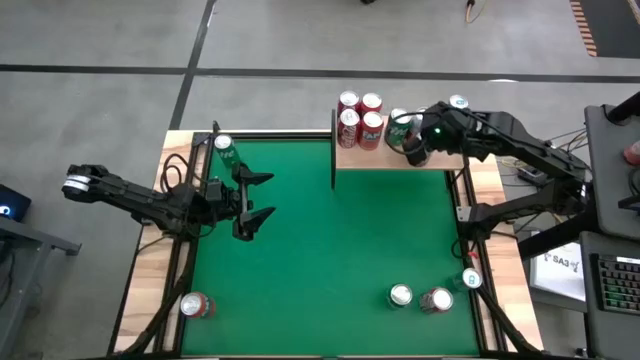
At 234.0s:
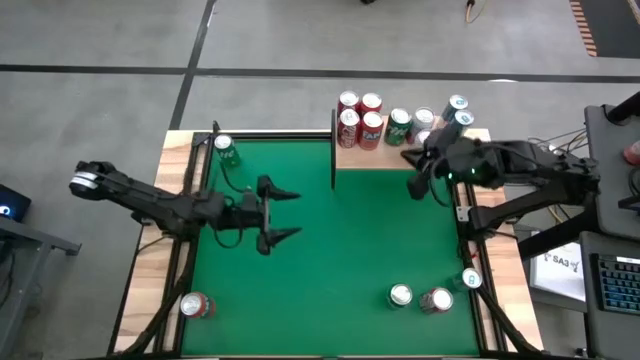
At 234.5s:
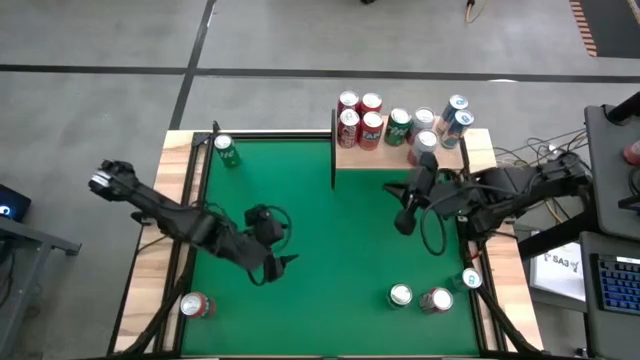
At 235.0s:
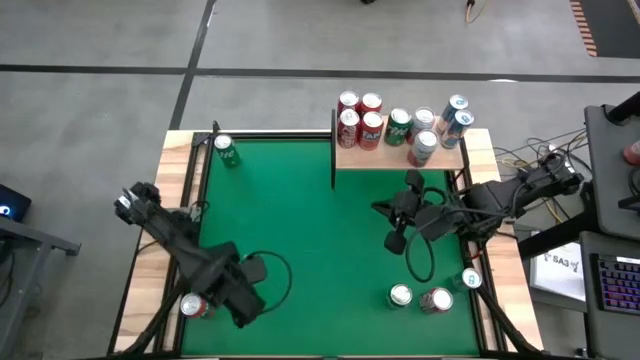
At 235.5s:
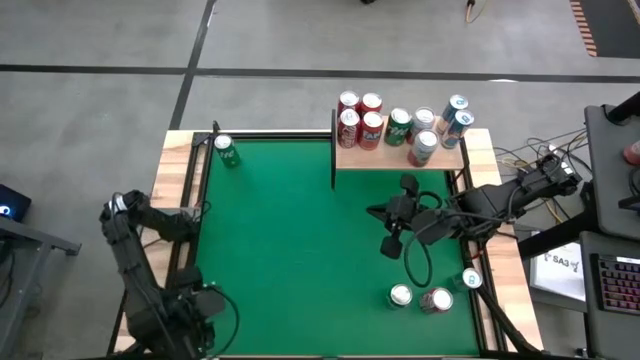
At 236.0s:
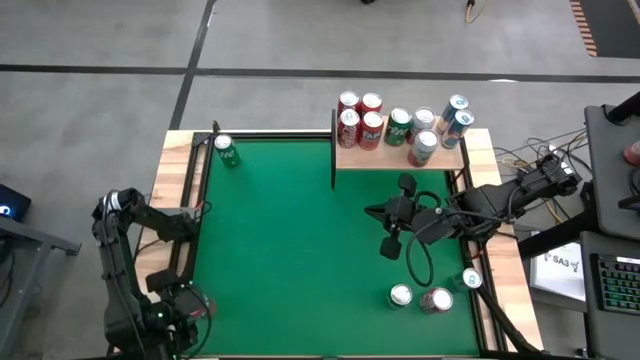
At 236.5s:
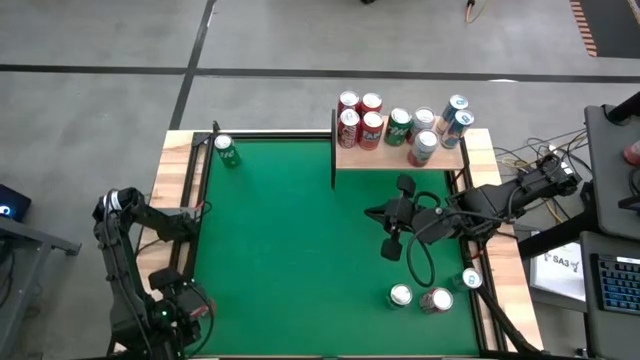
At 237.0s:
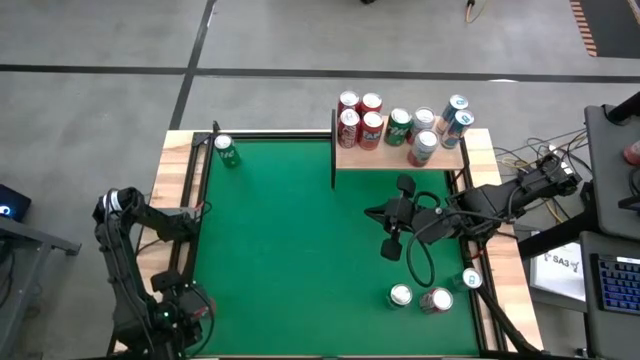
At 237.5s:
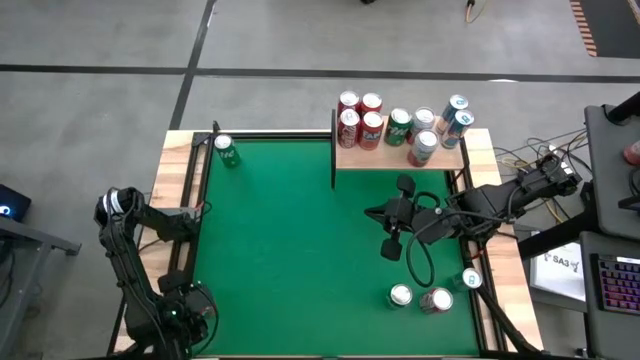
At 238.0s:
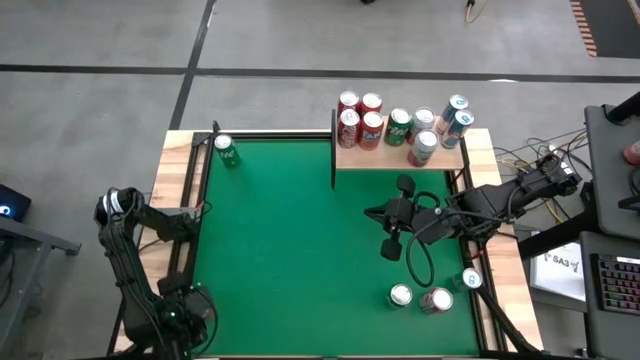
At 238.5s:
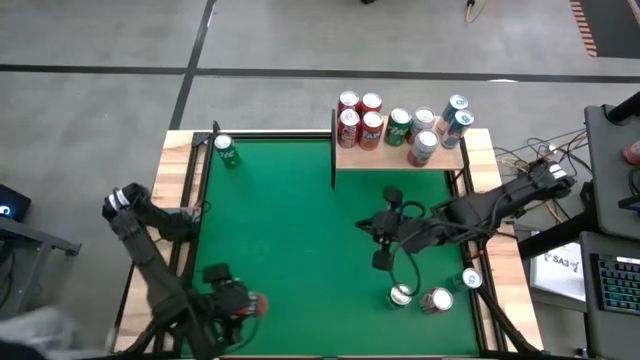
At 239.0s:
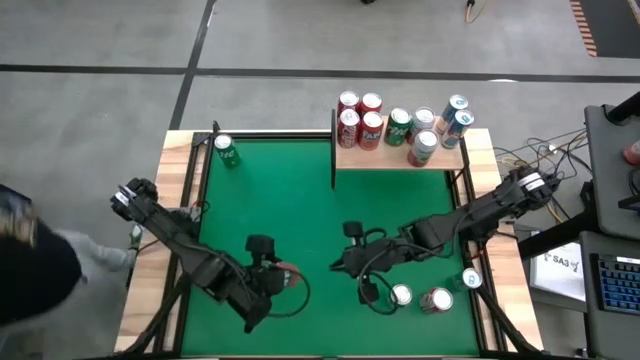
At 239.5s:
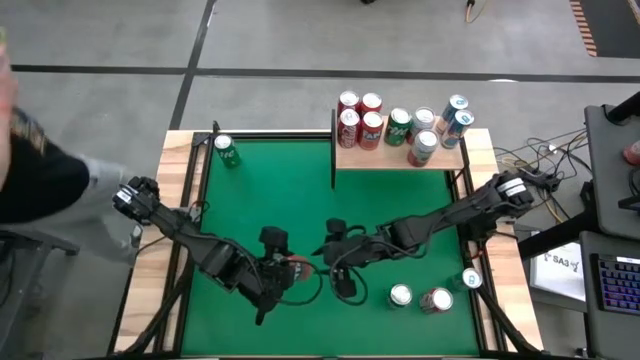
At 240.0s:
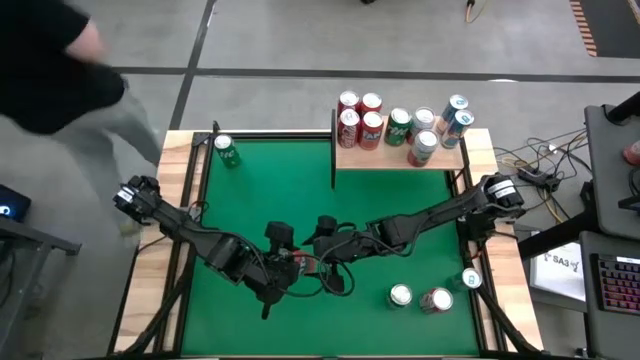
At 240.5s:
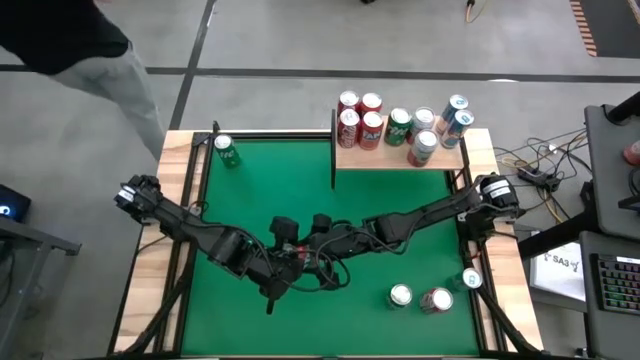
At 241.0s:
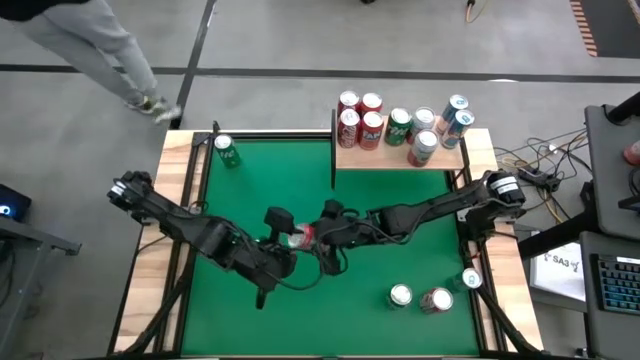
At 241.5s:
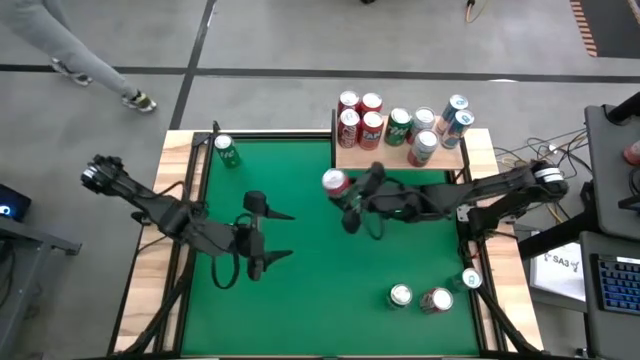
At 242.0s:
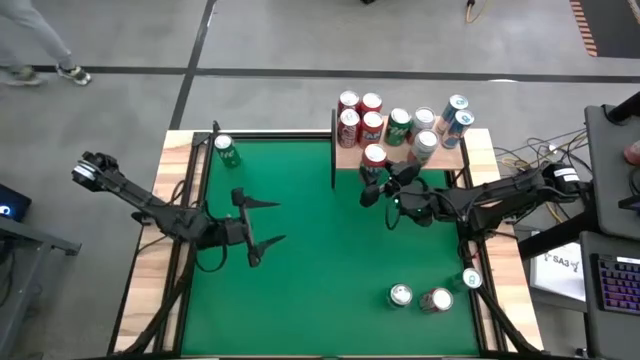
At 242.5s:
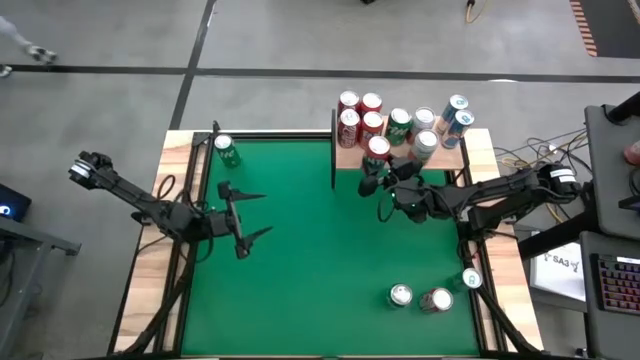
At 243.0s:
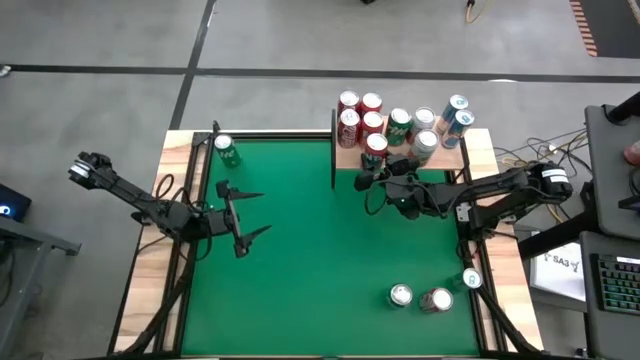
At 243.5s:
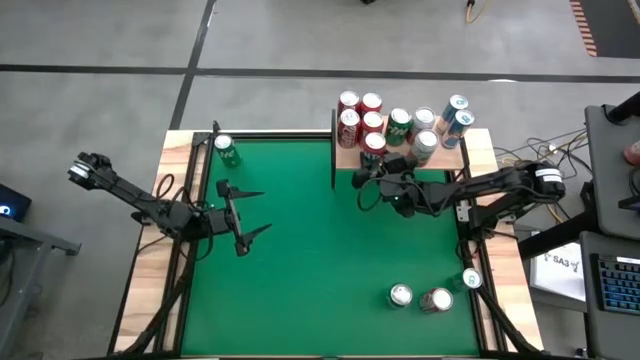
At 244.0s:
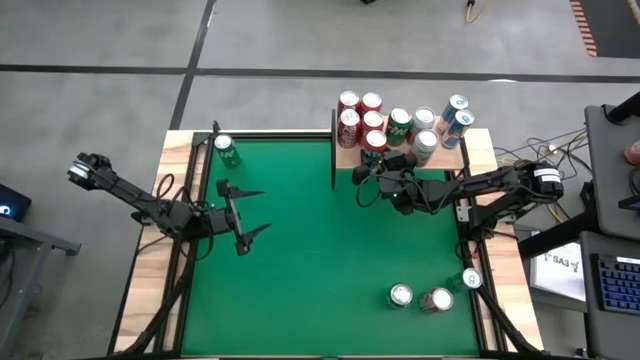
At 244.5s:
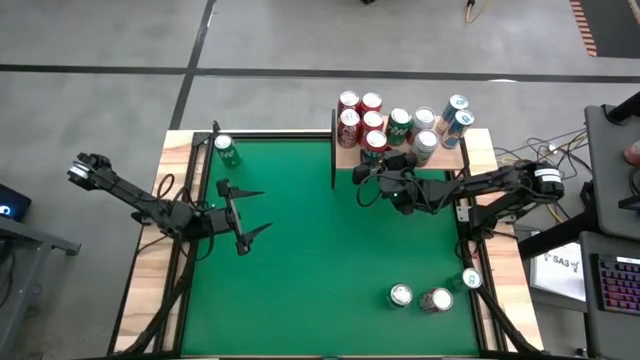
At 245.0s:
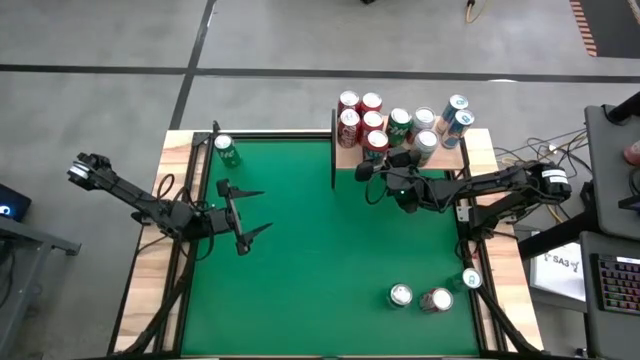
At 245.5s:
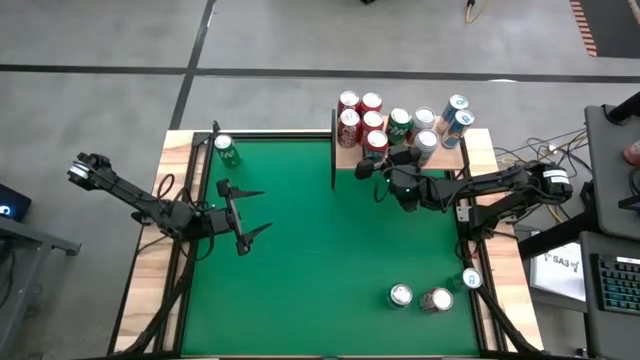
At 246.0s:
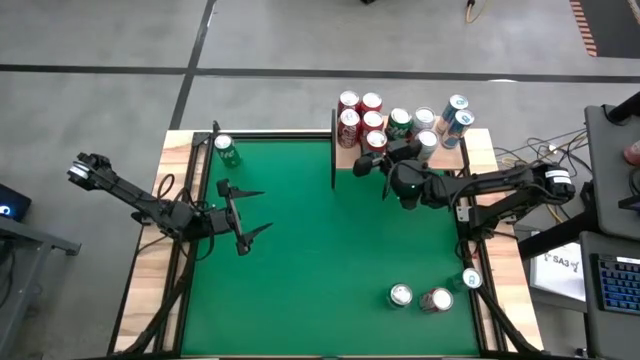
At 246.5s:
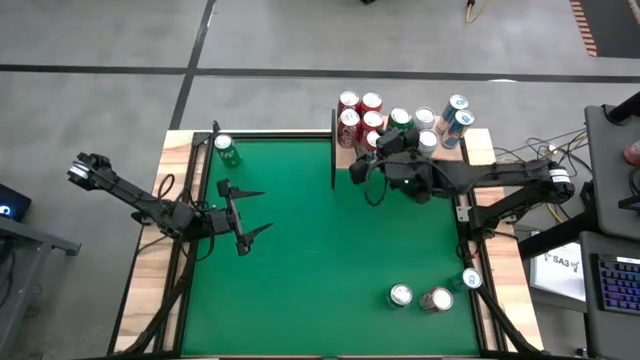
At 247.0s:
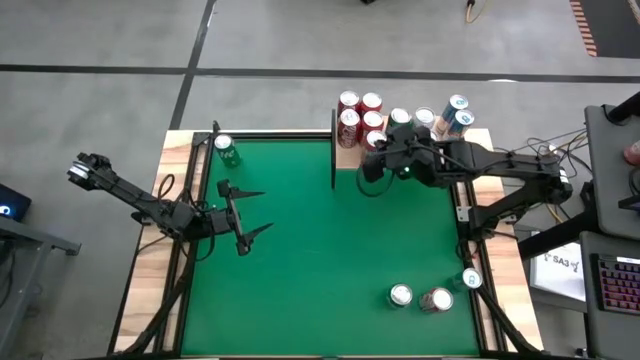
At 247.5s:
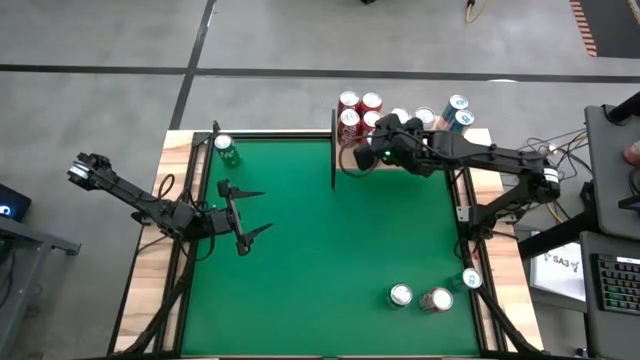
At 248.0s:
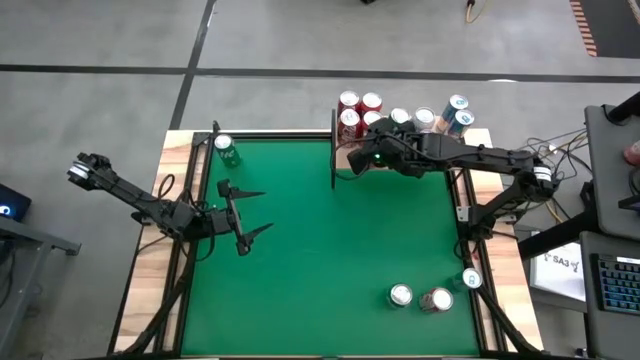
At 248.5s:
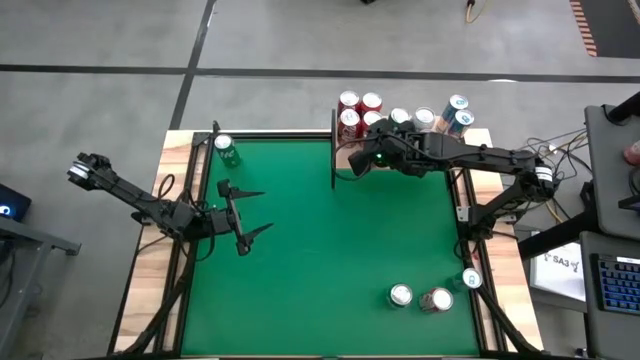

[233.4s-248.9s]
Task: Place canned beverage on shelf
Put the red soda can on the shelf aligned with the other red soda cans

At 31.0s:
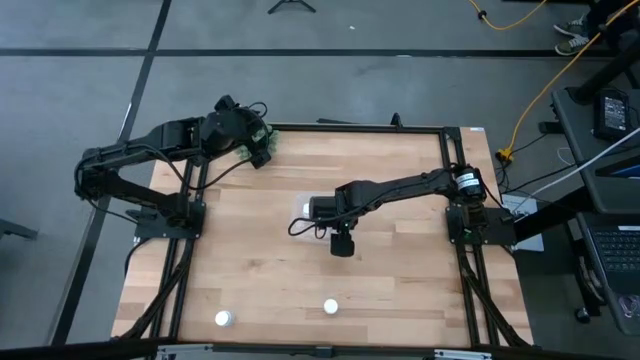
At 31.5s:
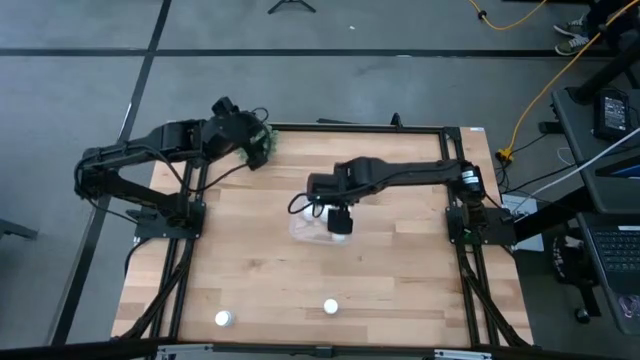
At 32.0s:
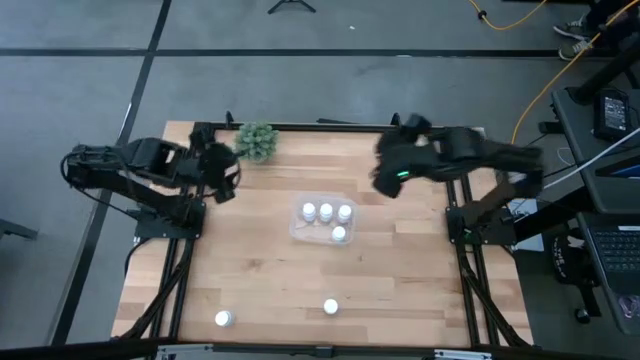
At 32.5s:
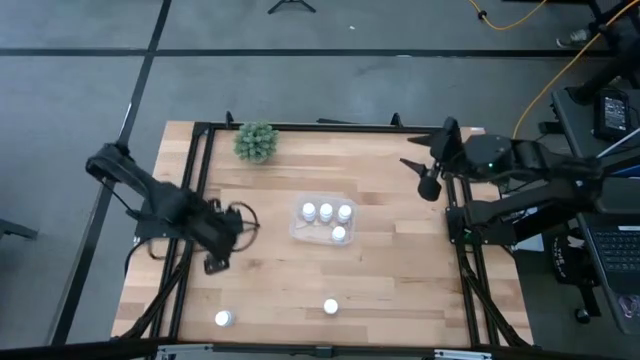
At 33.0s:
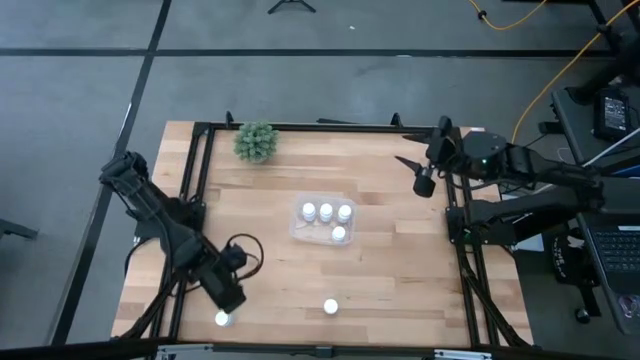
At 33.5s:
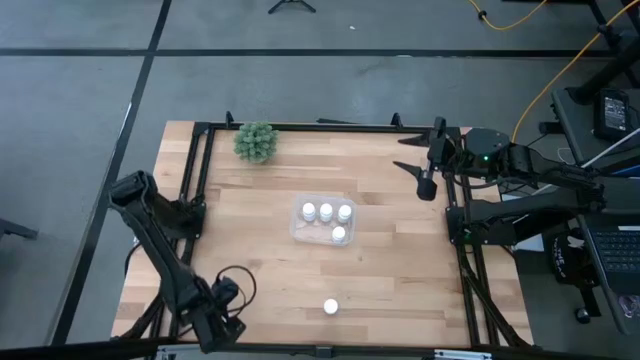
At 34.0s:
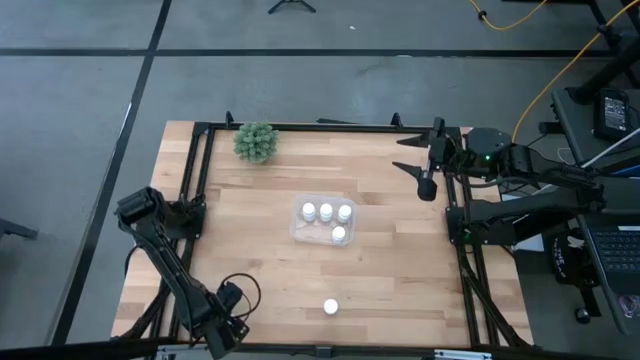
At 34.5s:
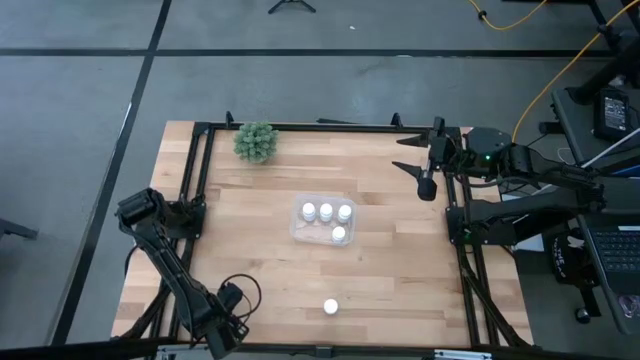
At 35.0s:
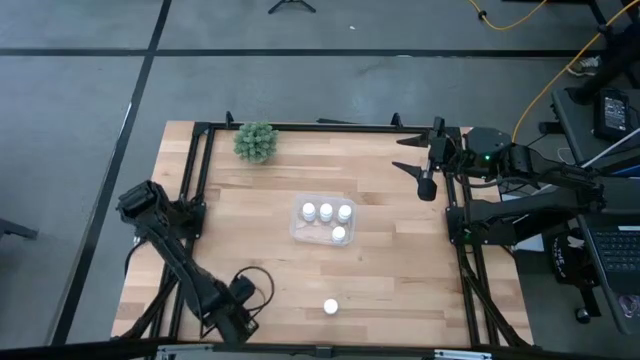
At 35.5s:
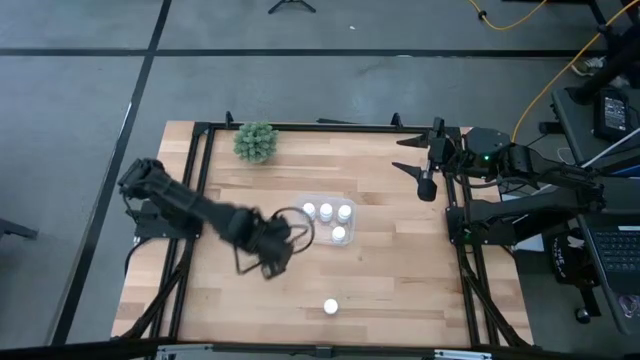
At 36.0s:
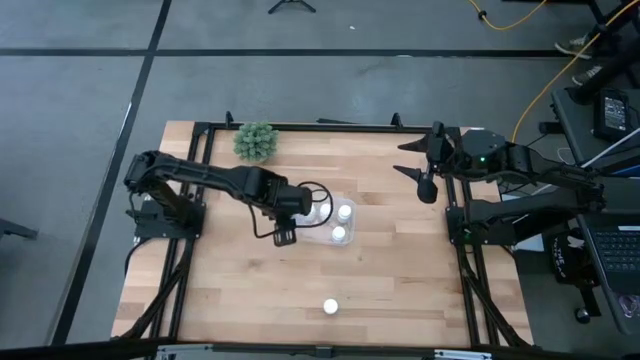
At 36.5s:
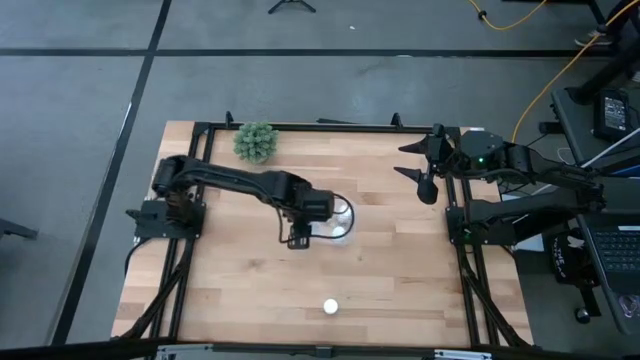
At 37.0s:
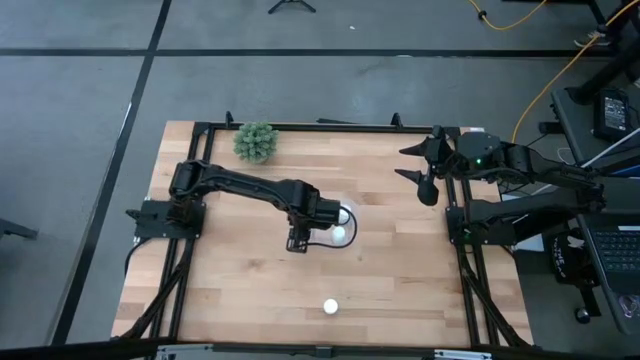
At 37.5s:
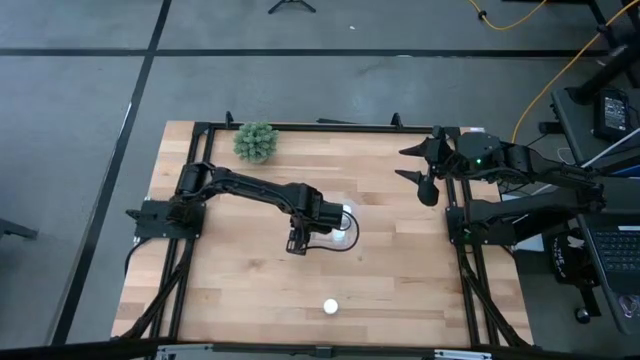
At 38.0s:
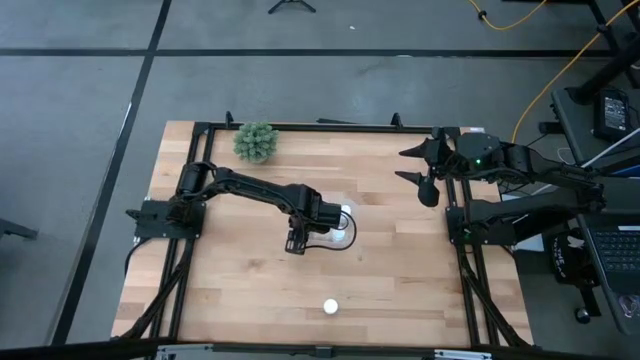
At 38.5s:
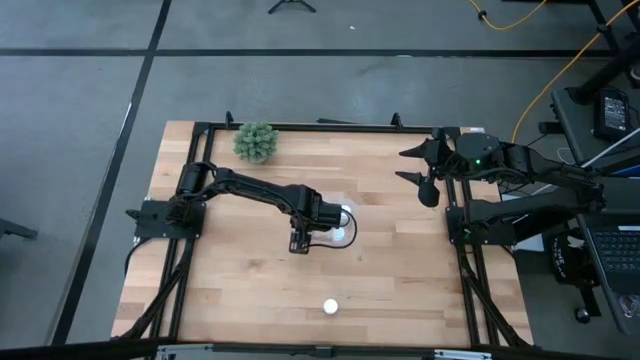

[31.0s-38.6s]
Task: Pick and place pill bottles into a basket
Put the bottom white medicine bottle into the transparent bin
